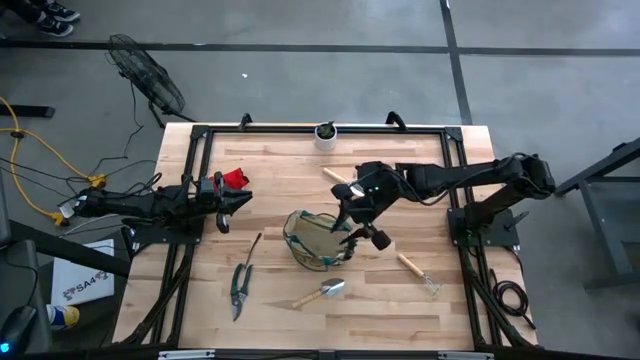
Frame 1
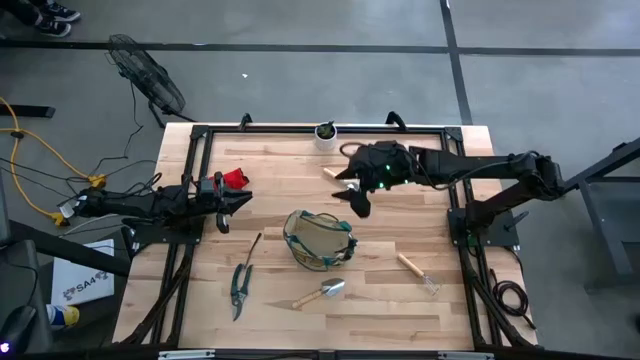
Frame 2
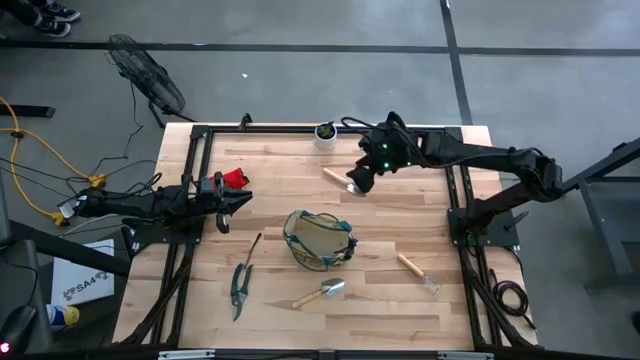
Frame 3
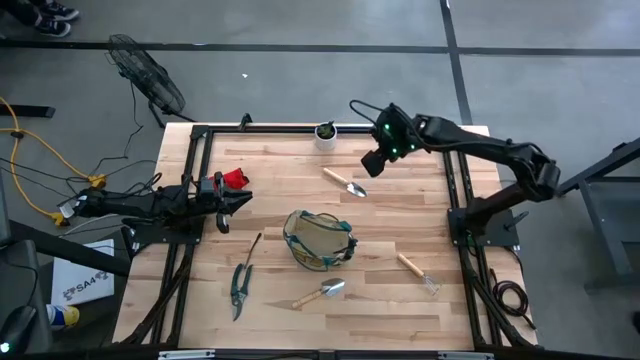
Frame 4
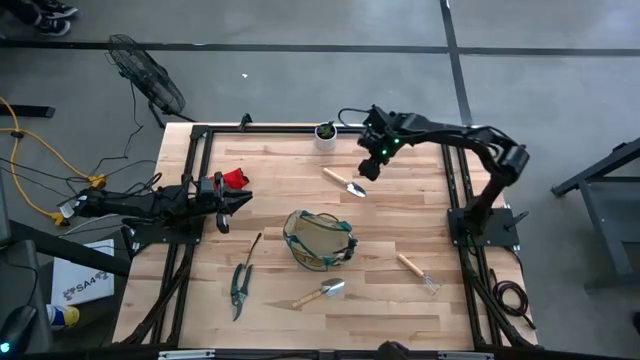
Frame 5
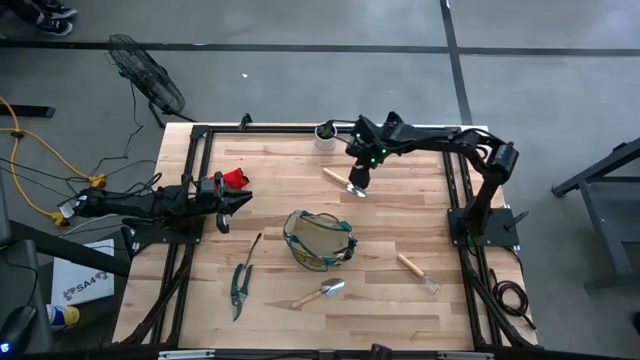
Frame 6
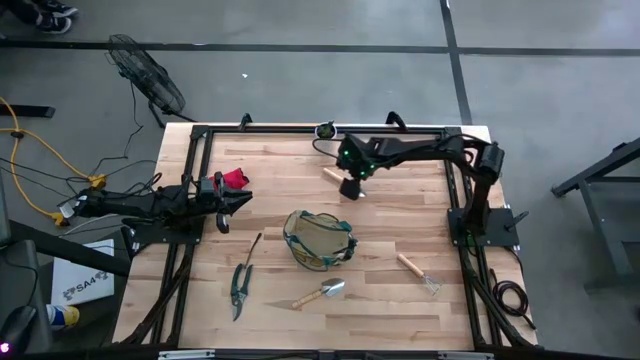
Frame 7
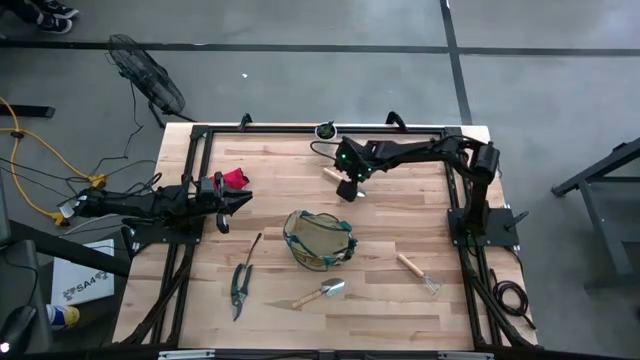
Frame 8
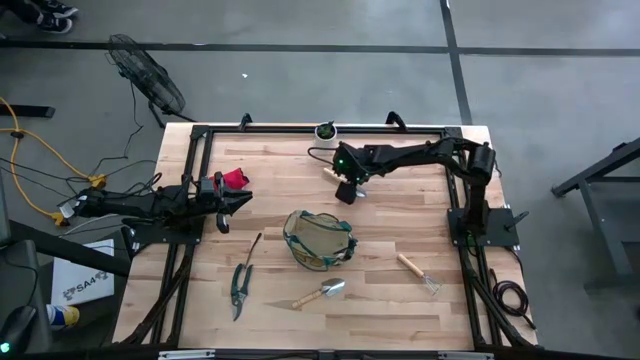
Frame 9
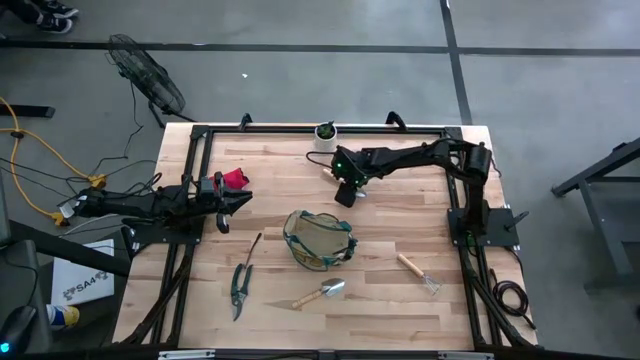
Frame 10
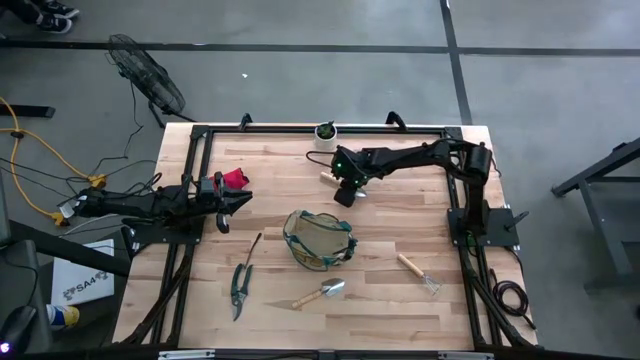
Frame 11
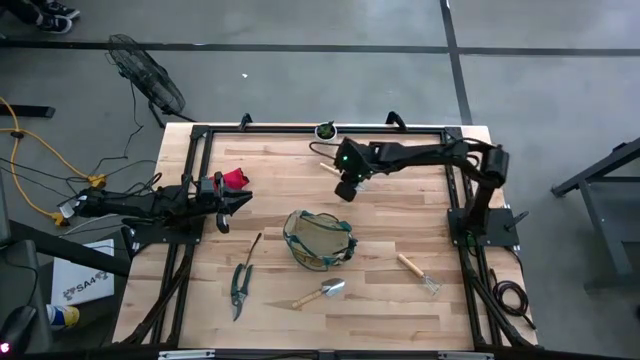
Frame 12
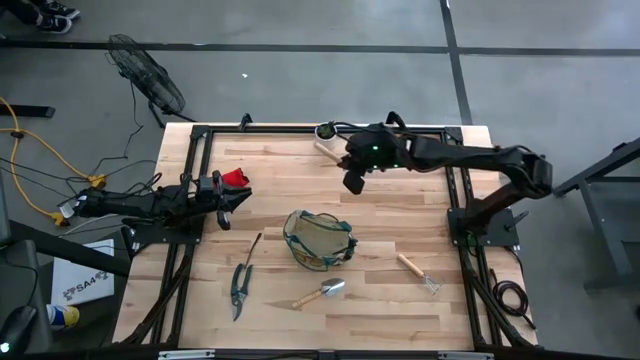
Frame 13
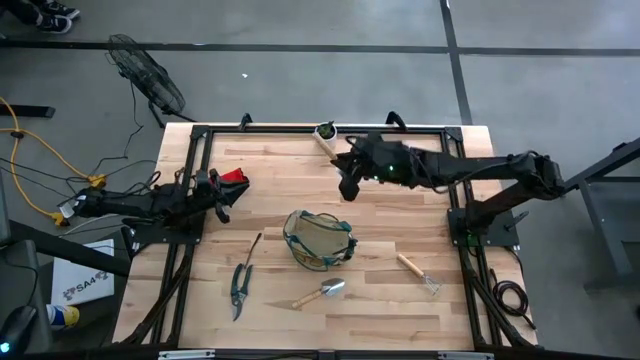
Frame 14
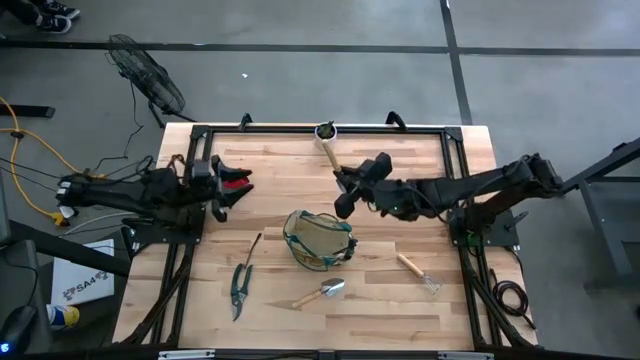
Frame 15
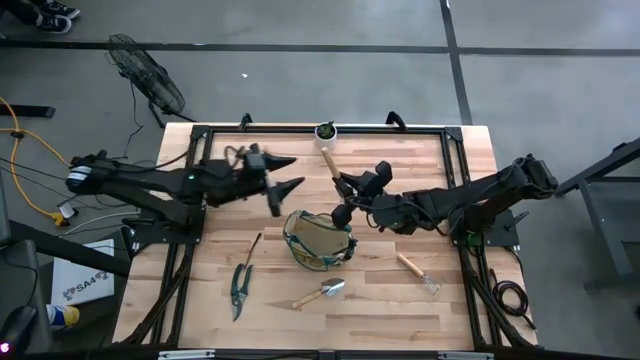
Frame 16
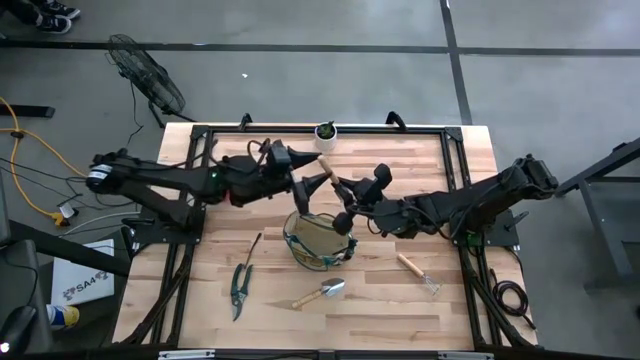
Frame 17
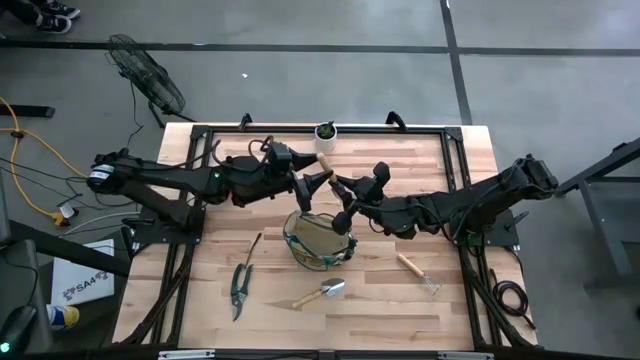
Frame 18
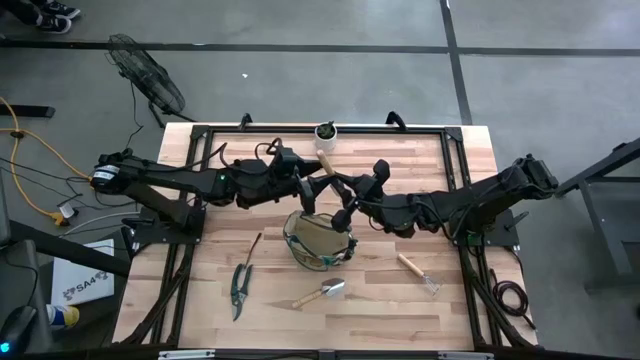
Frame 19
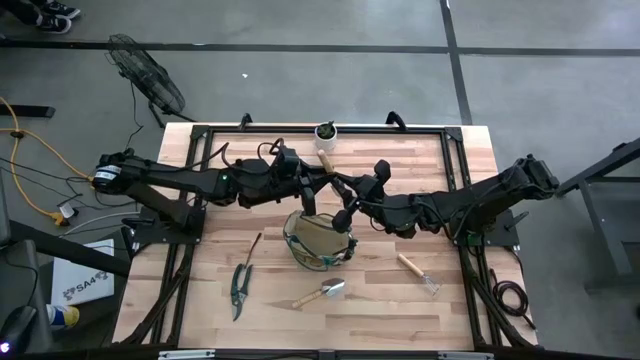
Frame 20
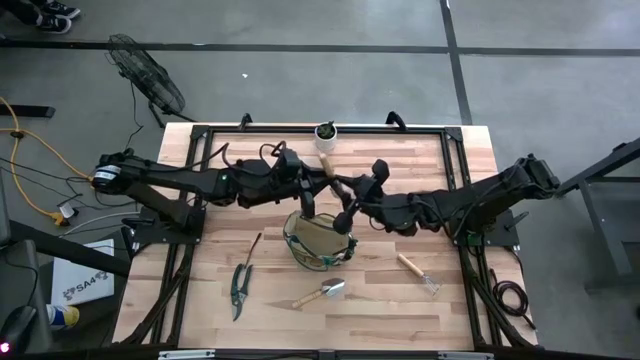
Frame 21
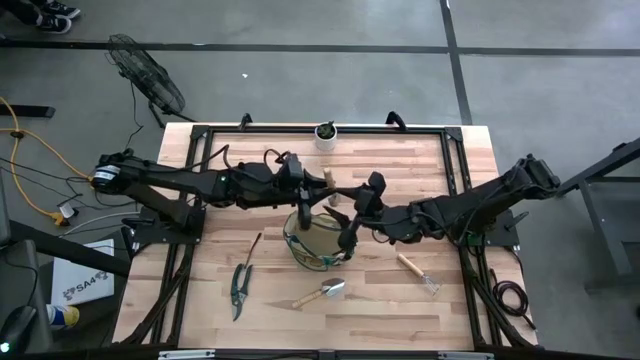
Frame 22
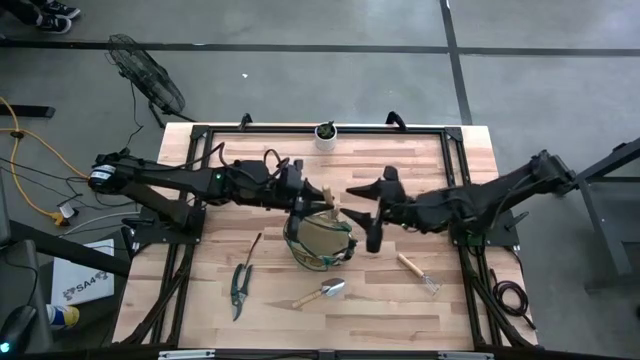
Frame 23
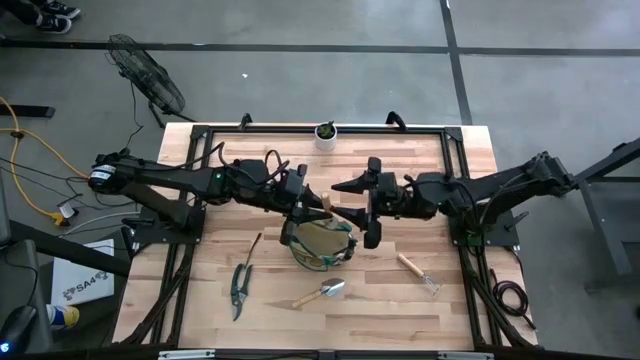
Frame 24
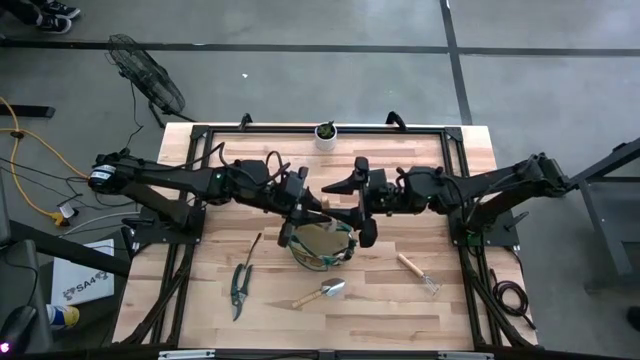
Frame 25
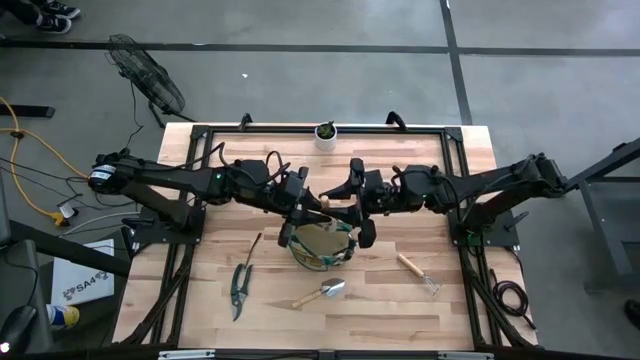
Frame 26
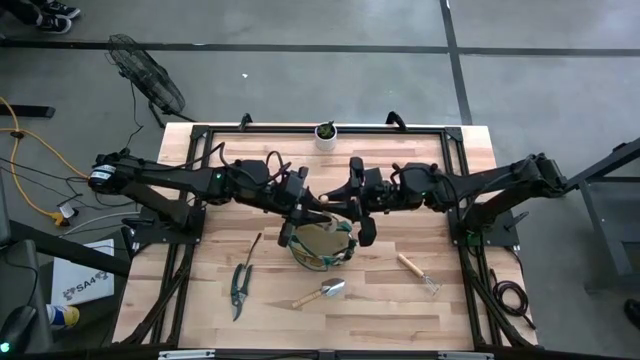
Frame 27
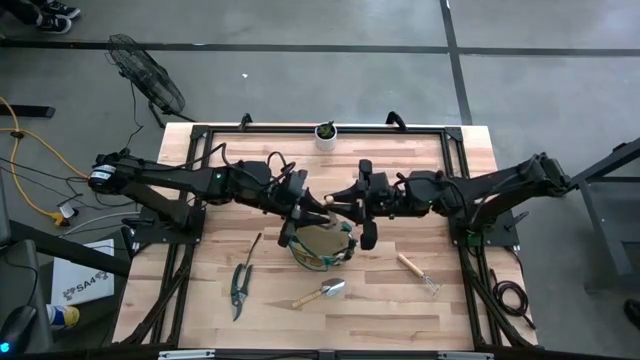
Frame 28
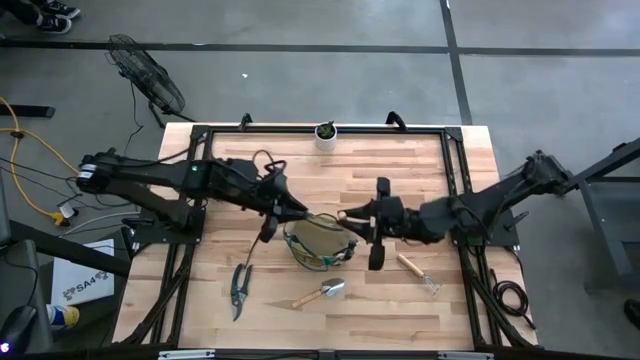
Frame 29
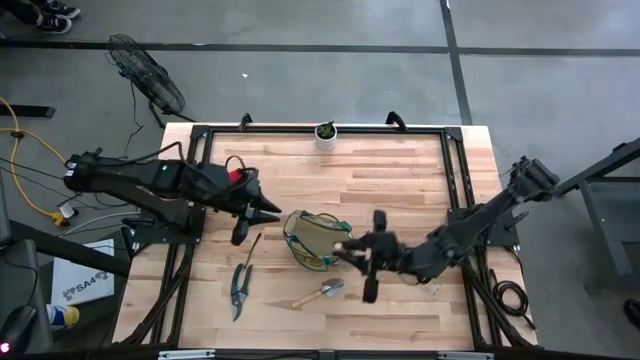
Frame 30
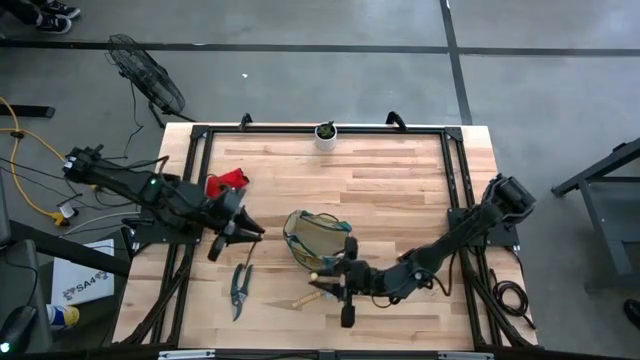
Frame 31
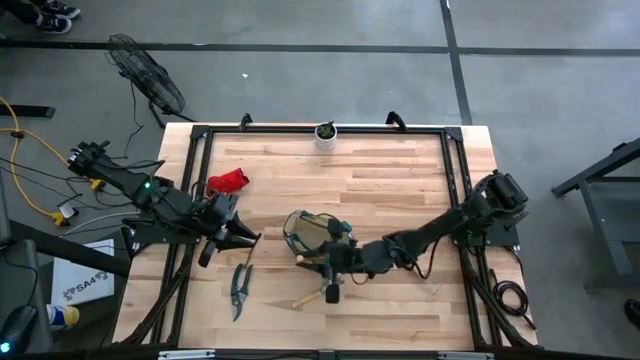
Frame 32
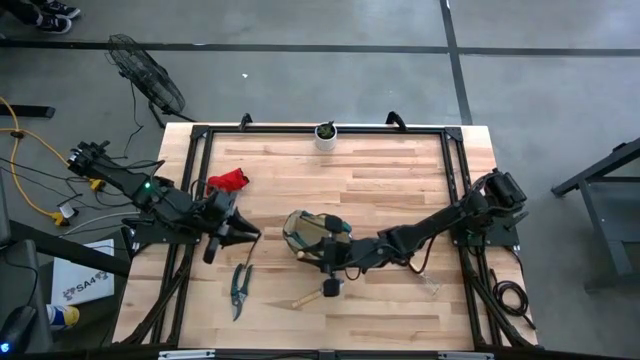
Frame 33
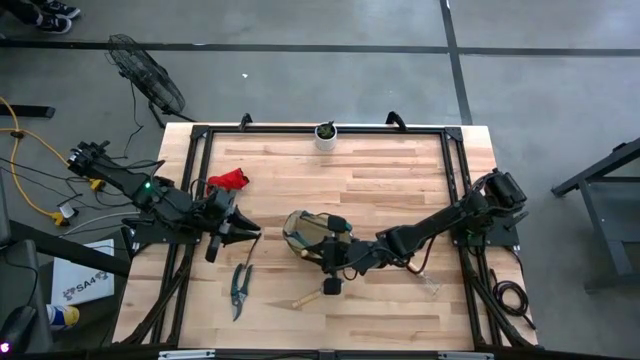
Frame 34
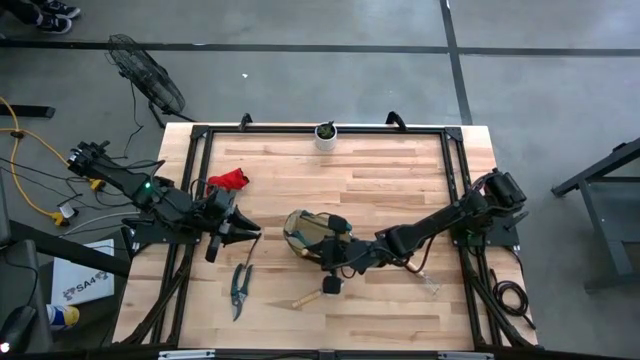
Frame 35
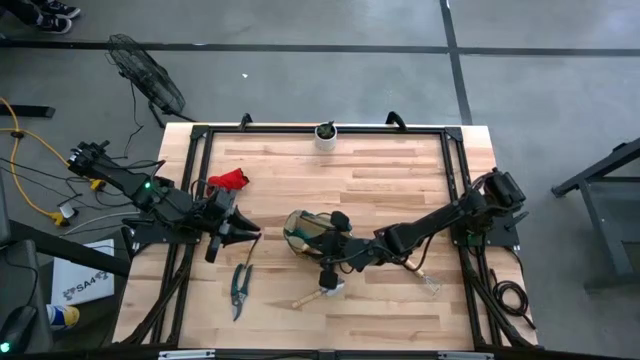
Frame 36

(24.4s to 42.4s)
Task: Pick & Place Garden tools in Gardening bag
Put the brown trowel into the gardening bag
